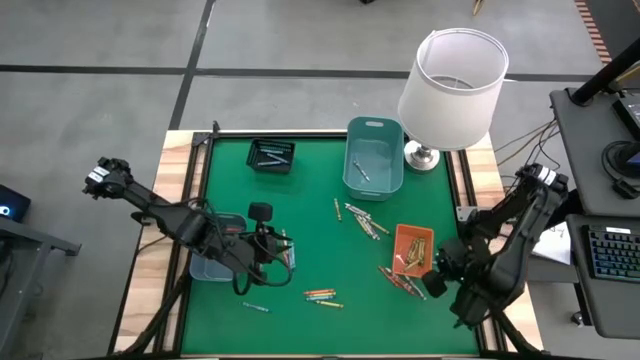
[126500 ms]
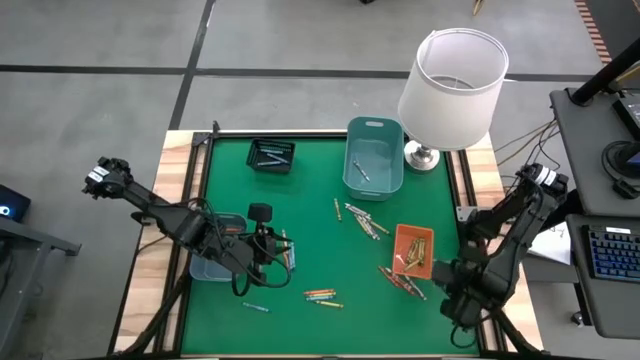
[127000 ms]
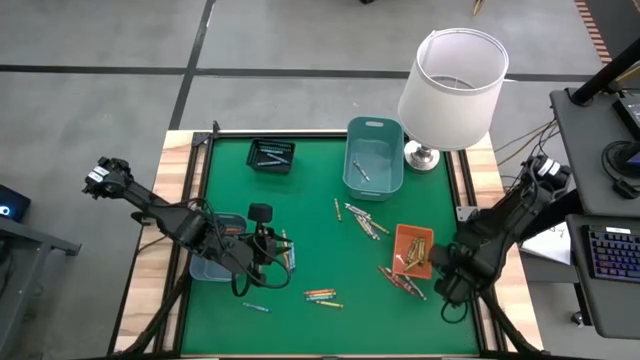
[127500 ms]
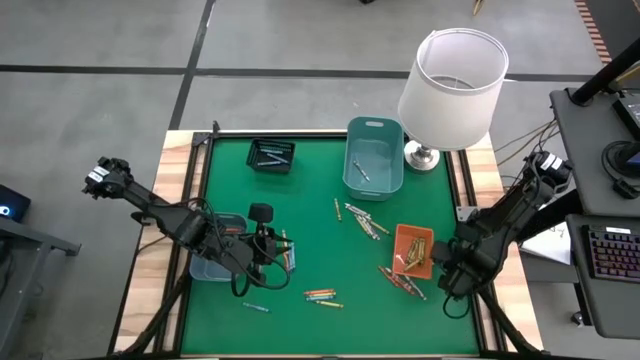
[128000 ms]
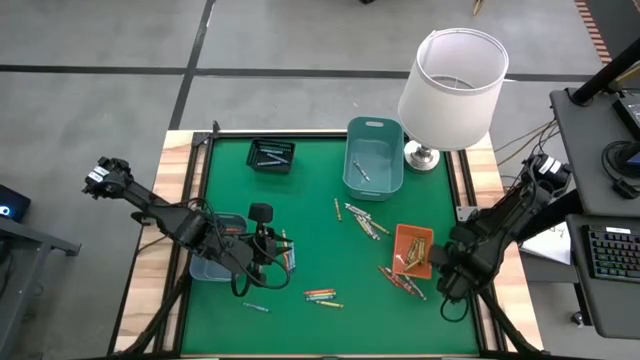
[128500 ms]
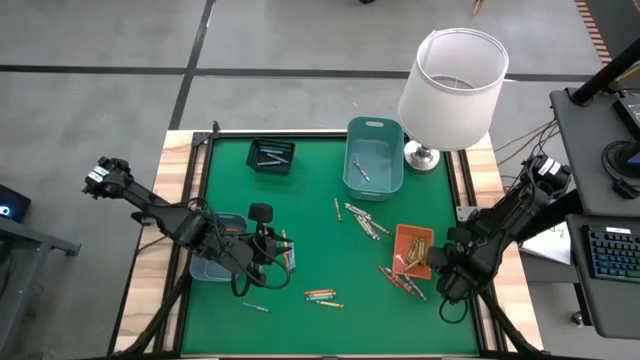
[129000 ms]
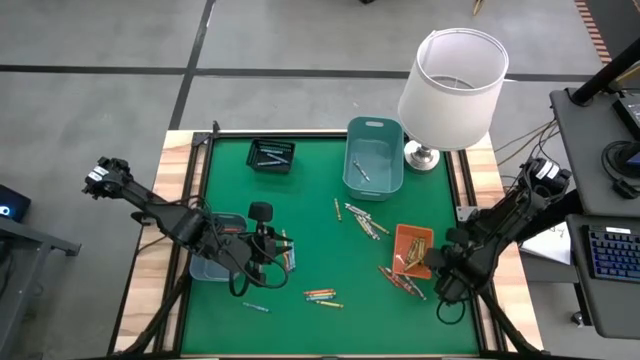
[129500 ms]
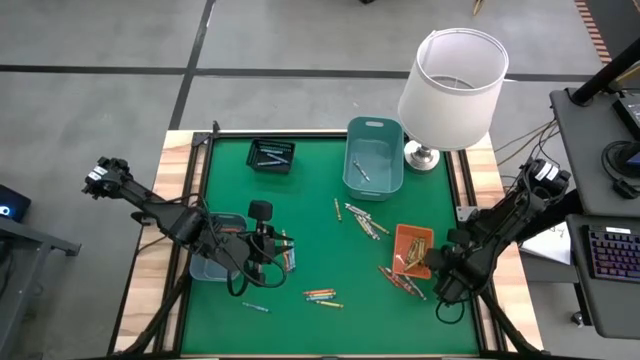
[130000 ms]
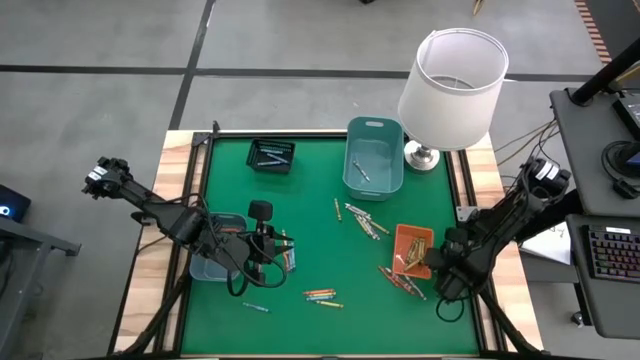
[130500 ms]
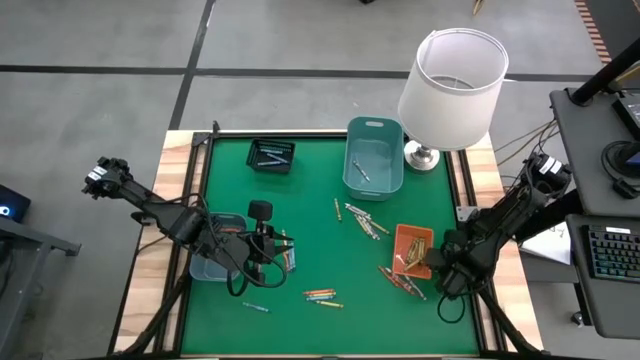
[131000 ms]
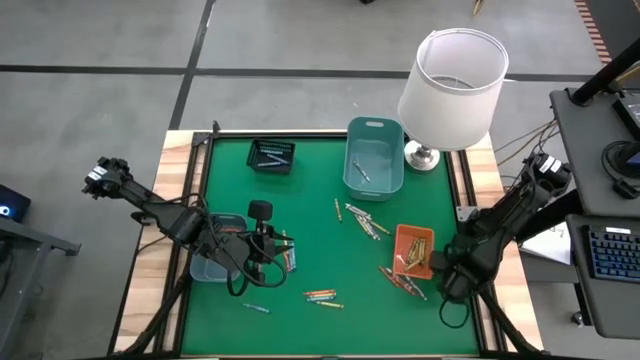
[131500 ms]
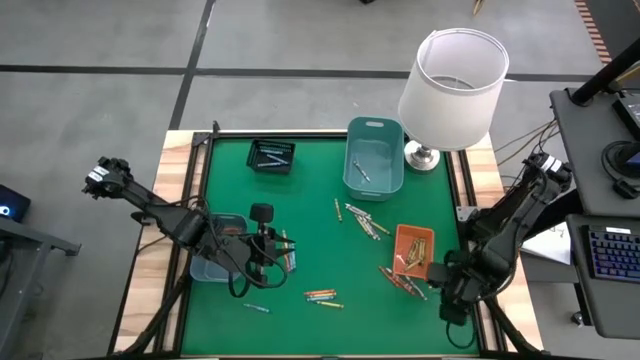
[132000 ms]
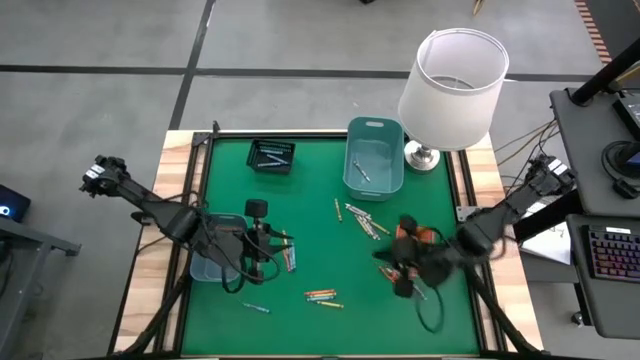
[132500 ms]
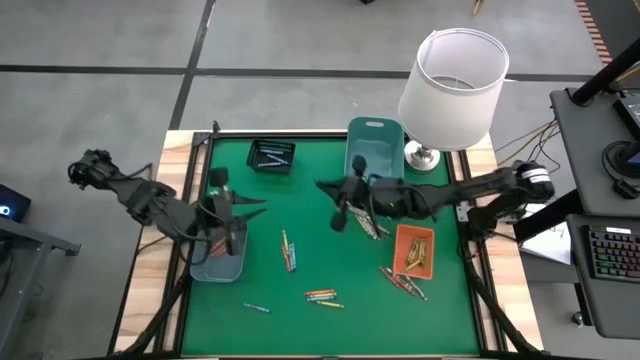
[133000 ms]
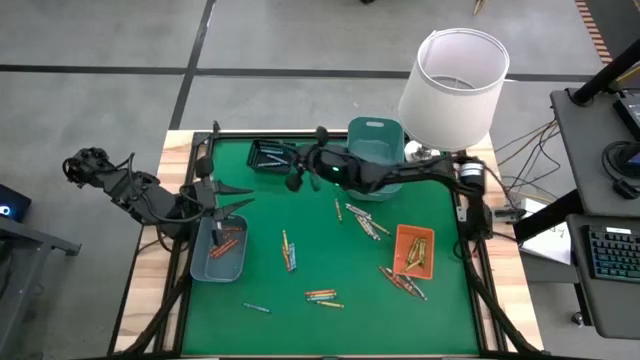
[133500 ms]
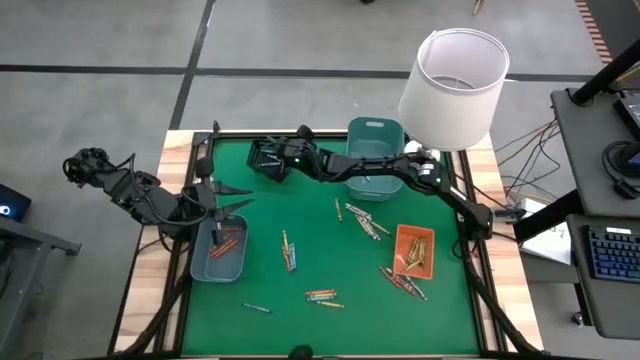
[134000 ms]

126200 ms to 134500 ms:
Task: Sort crayons
Put the blue crayon into the black bin

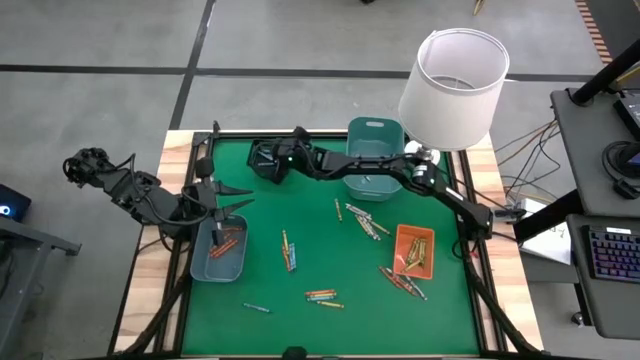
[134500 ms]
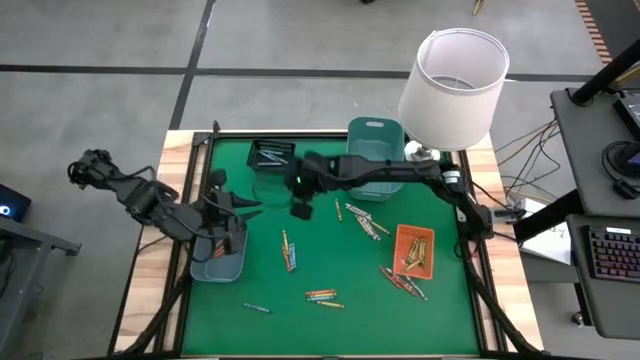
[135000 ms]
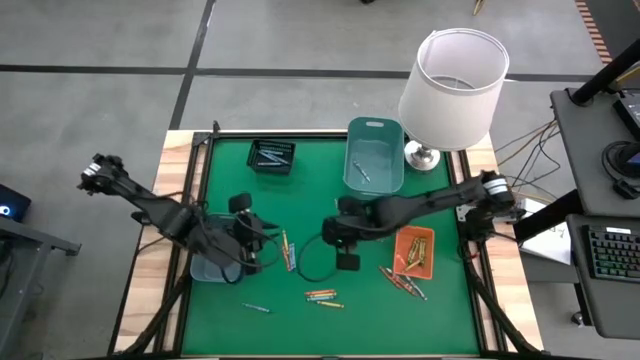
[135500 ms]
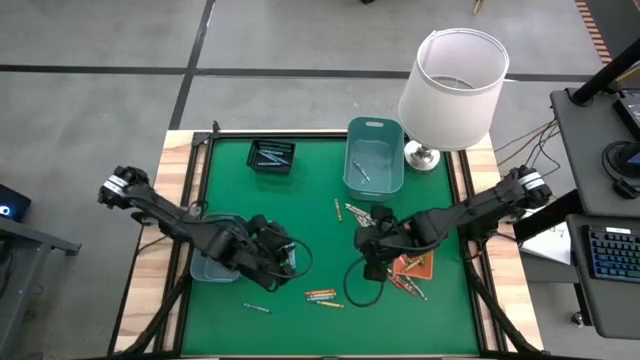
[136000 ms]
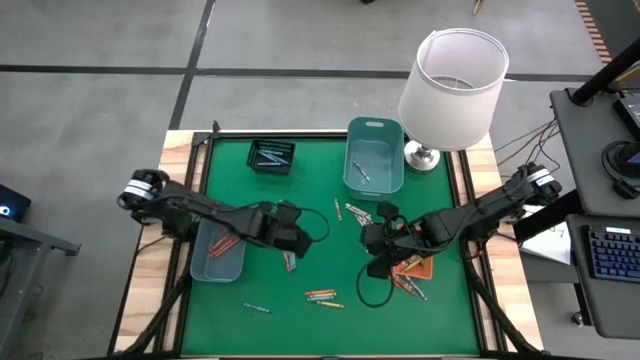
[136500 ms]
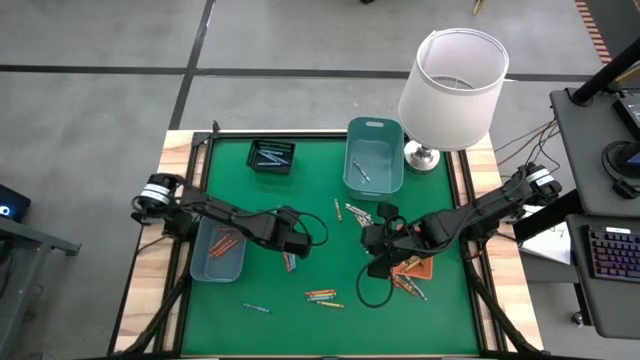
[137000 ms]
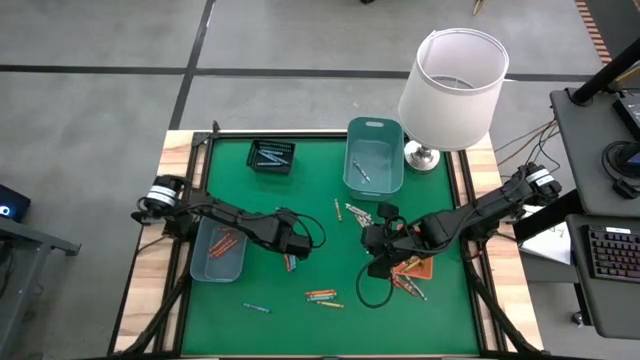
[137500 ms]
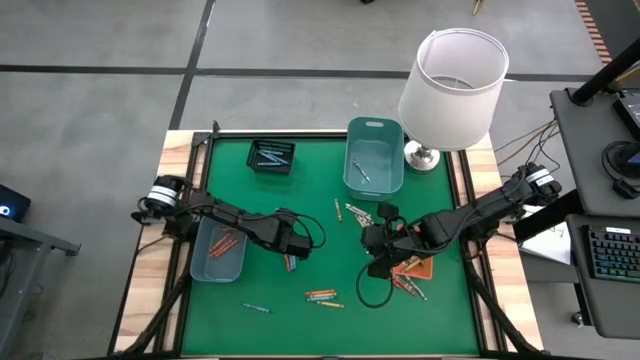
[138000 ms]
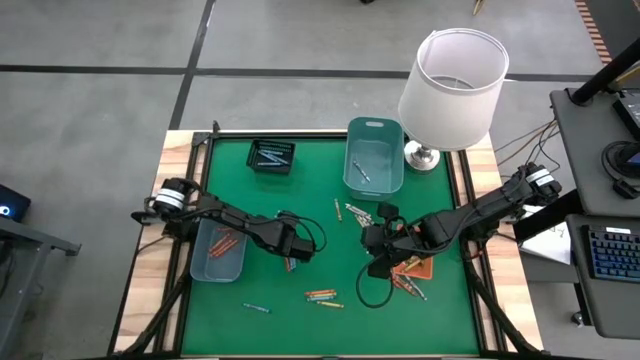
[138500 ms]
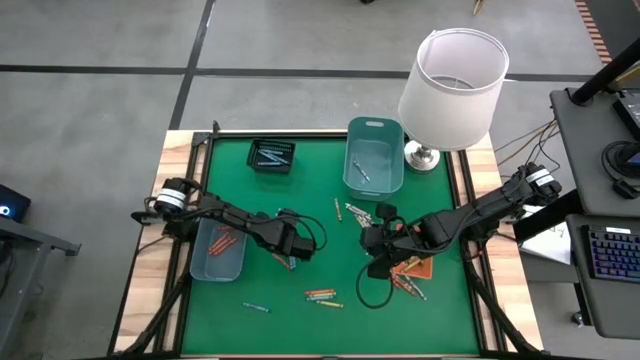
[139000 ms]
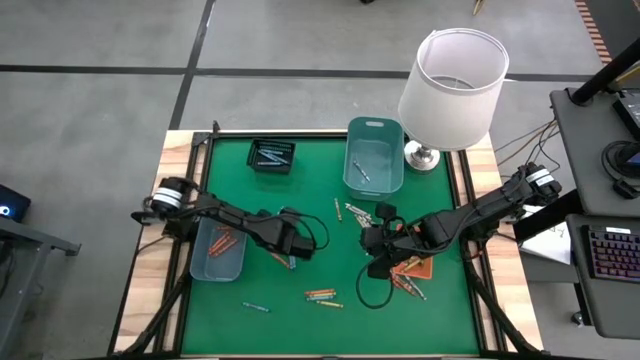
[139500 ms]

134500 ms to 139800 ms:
Put the green crayon into the orange bin

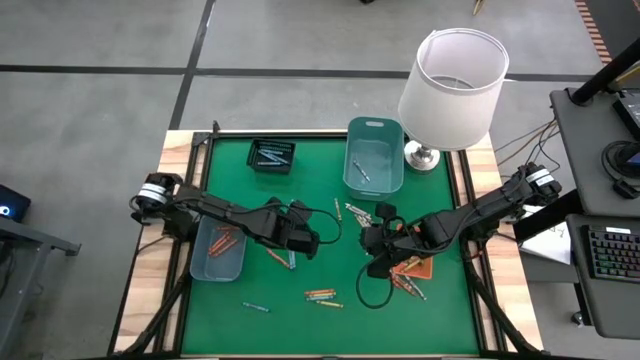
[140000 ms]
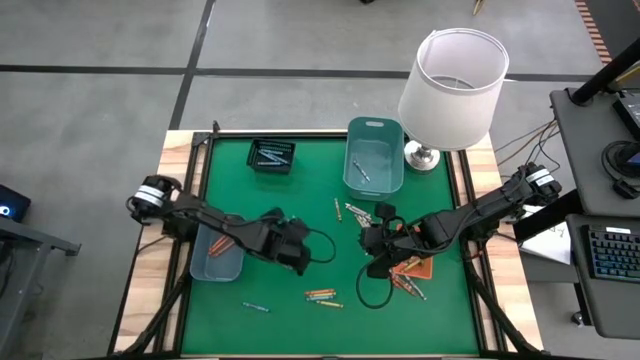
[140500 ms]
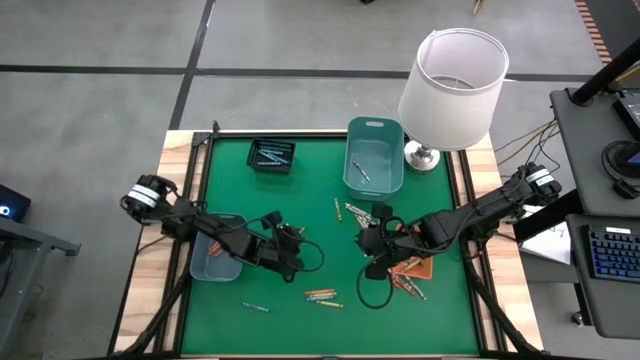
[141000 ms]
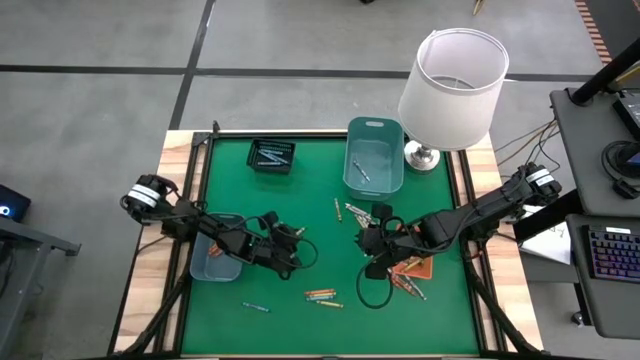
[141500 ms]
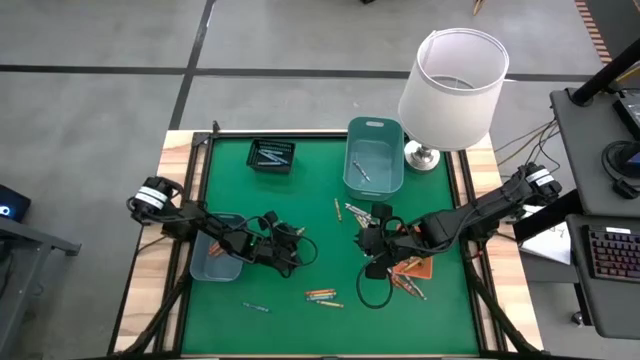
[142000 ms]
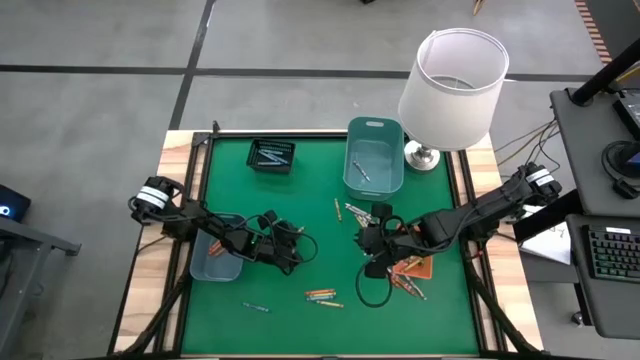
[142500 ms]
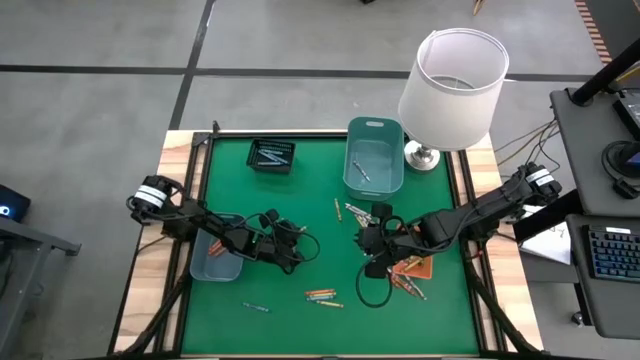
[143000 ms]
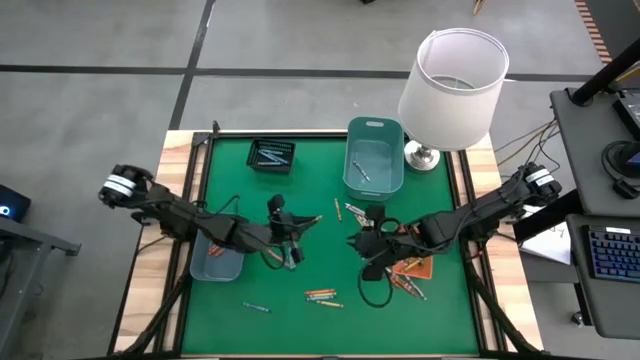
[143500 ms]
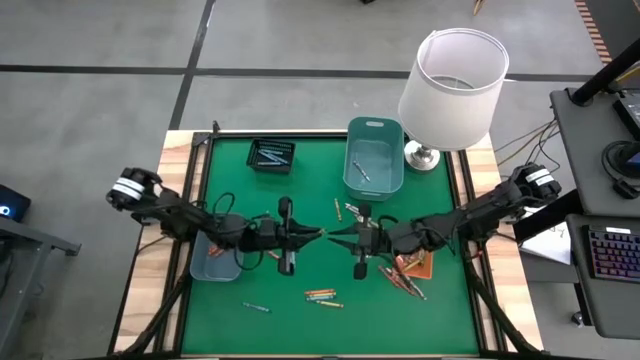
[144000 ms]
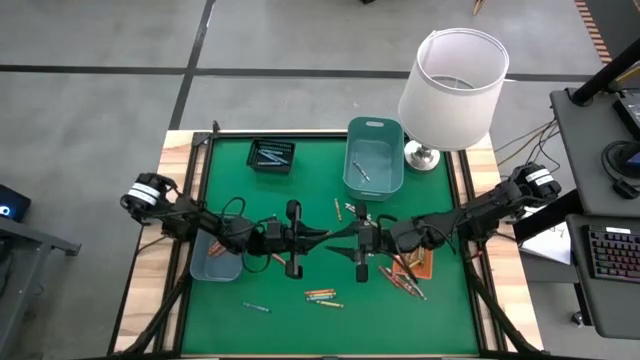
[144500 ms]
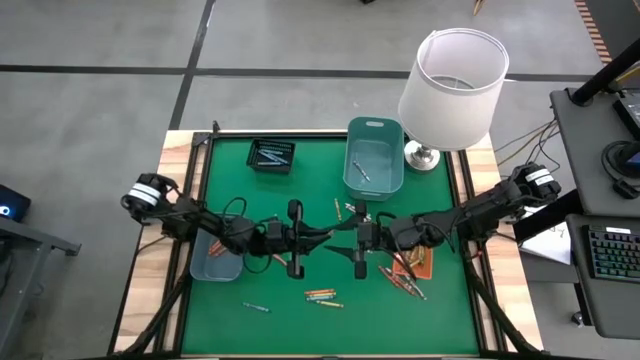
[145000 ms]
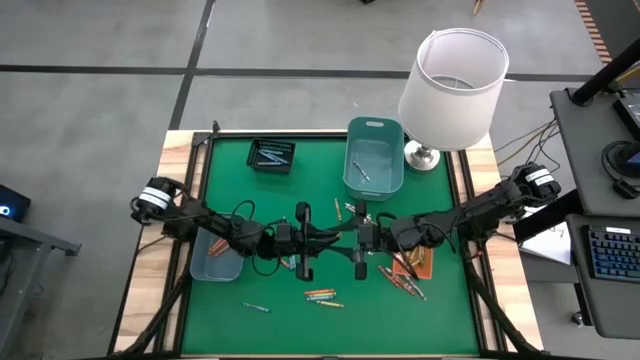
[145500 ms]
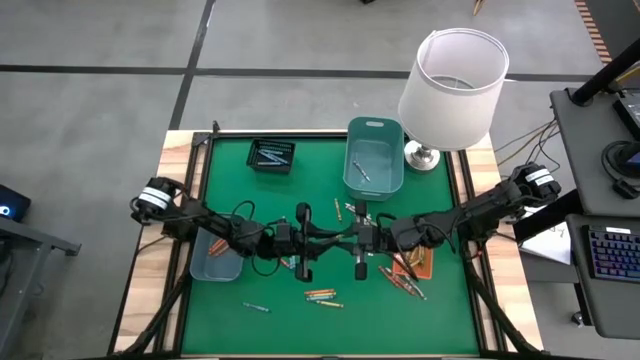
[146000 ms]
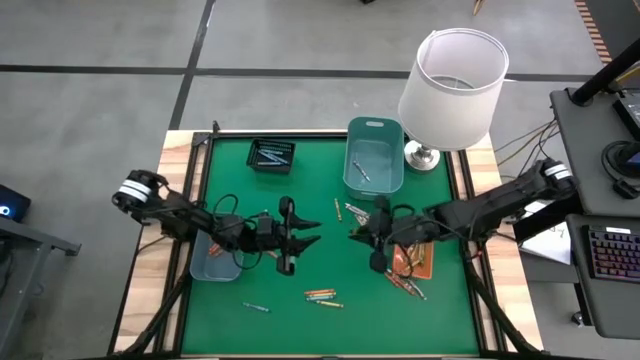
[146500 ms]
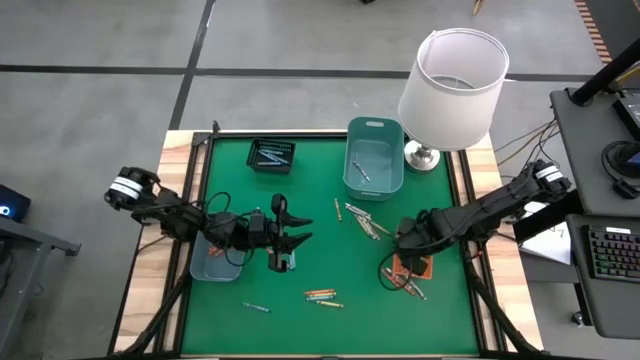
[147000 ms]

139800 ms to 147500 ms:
Put the green crayon into the orange bin
